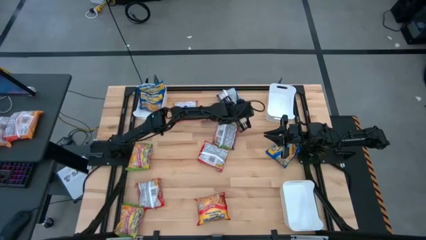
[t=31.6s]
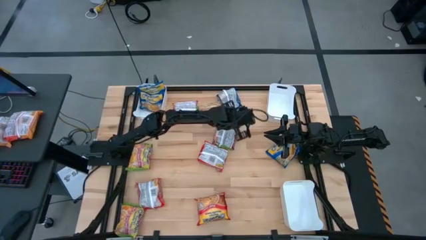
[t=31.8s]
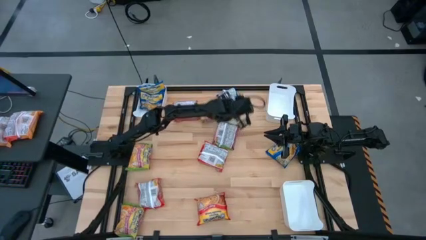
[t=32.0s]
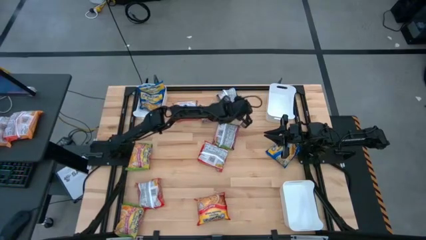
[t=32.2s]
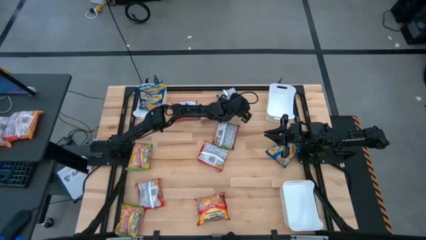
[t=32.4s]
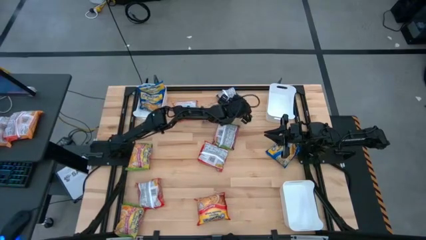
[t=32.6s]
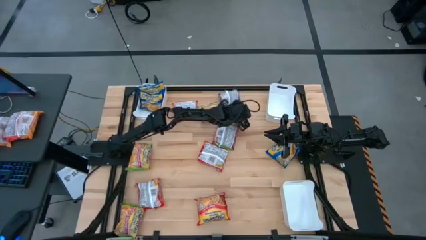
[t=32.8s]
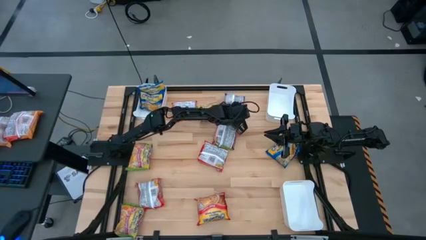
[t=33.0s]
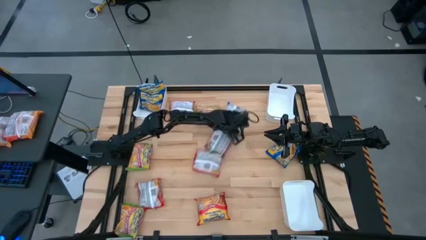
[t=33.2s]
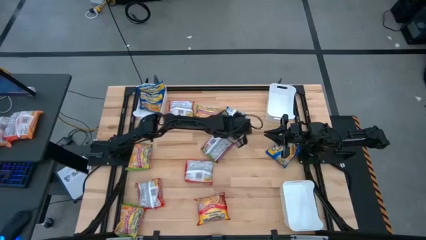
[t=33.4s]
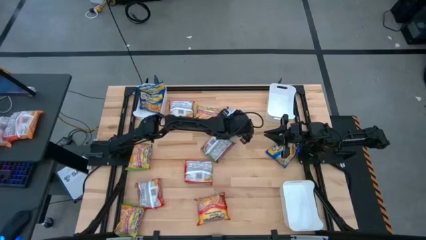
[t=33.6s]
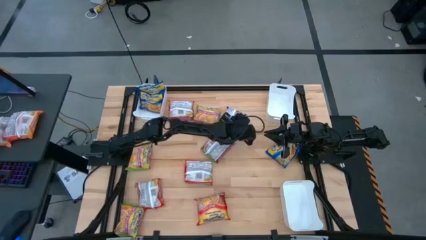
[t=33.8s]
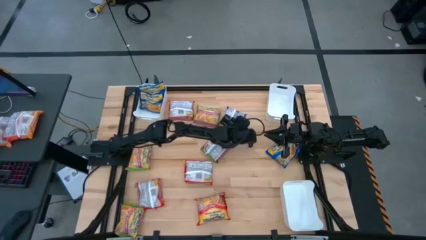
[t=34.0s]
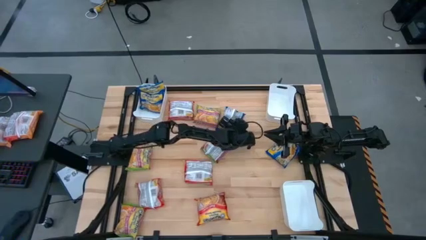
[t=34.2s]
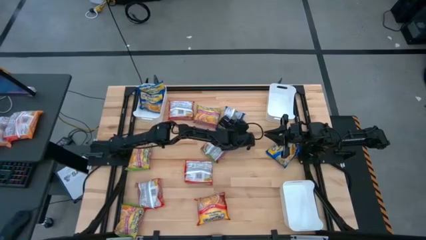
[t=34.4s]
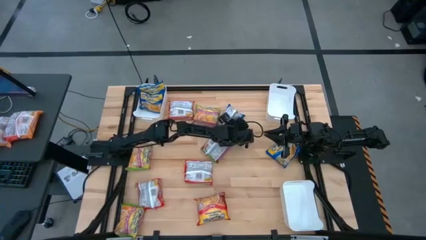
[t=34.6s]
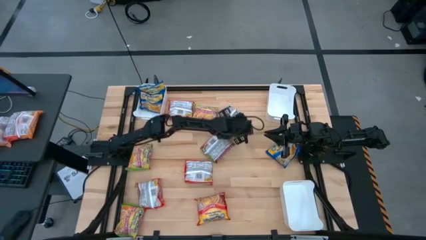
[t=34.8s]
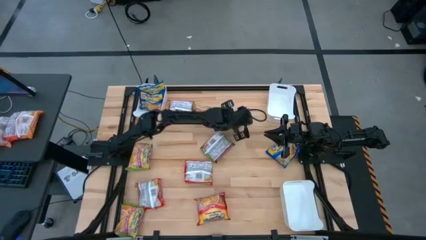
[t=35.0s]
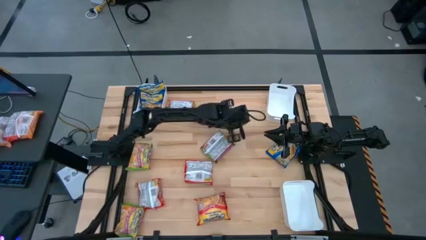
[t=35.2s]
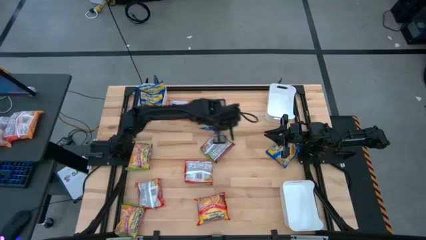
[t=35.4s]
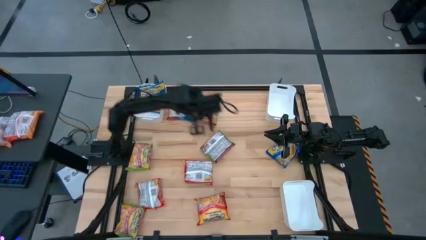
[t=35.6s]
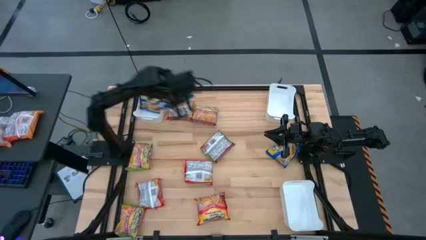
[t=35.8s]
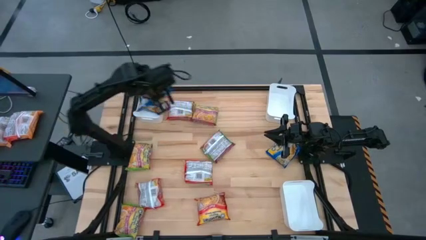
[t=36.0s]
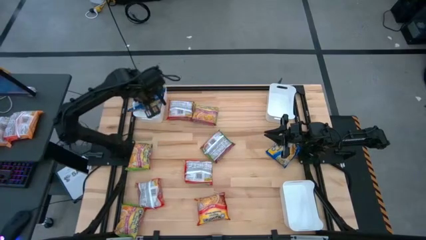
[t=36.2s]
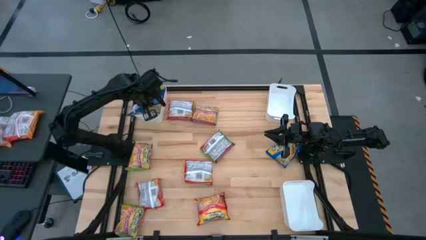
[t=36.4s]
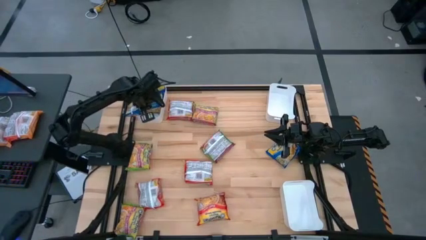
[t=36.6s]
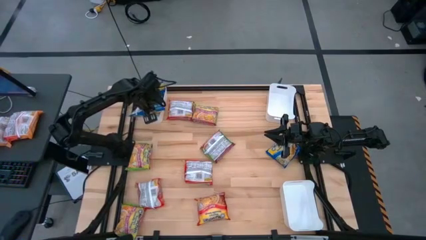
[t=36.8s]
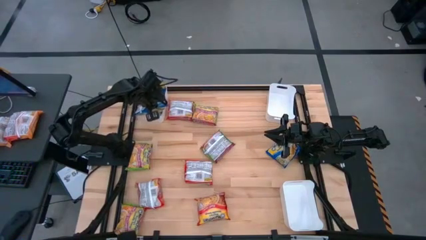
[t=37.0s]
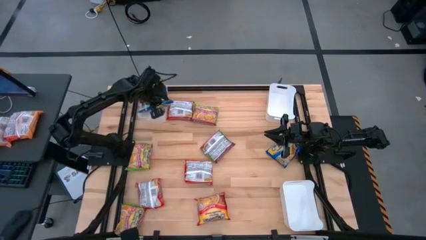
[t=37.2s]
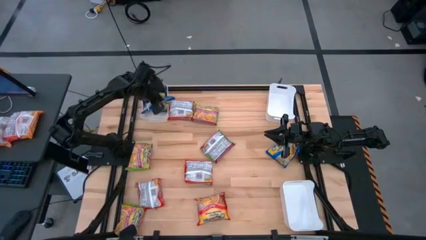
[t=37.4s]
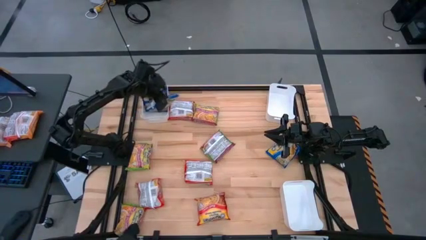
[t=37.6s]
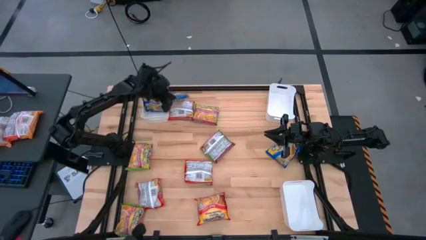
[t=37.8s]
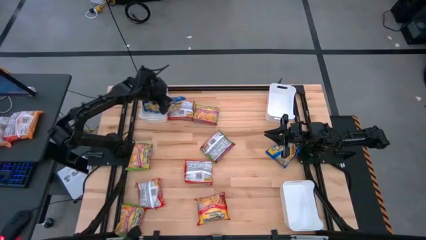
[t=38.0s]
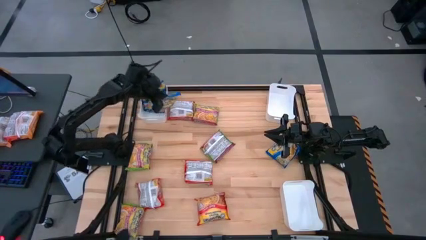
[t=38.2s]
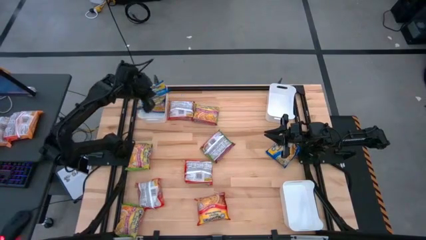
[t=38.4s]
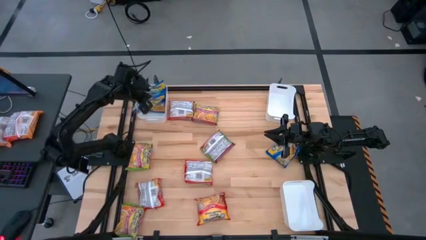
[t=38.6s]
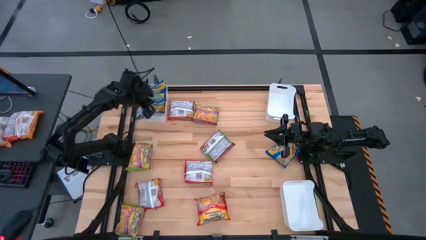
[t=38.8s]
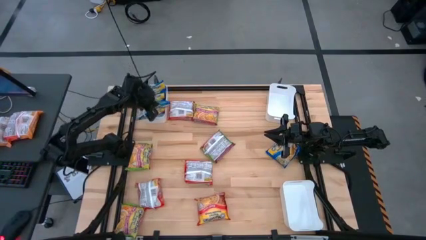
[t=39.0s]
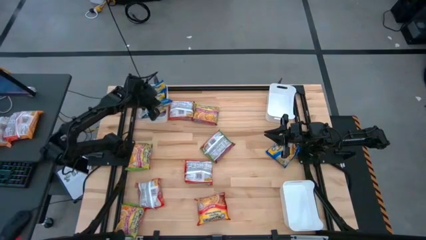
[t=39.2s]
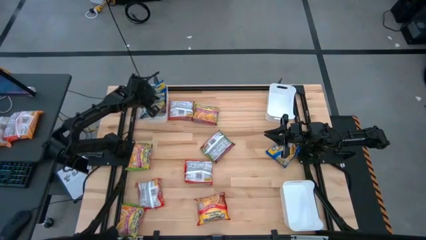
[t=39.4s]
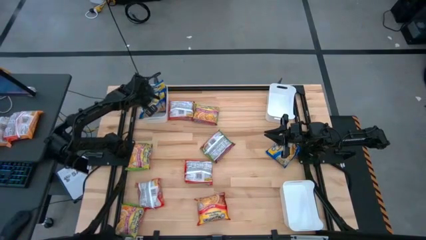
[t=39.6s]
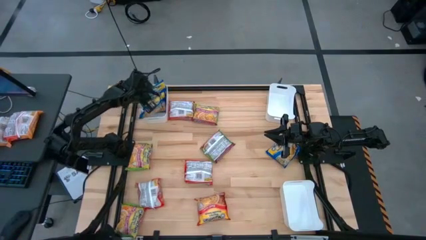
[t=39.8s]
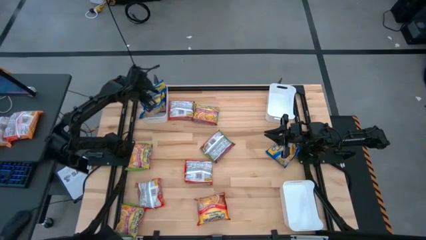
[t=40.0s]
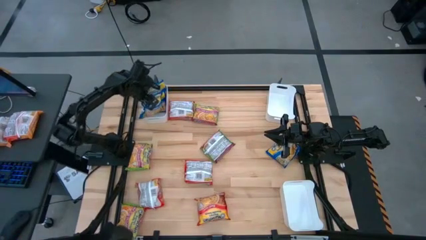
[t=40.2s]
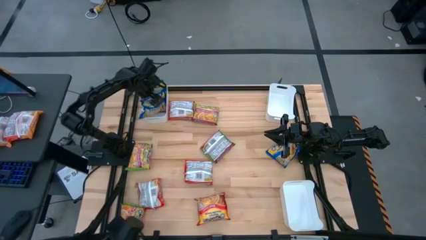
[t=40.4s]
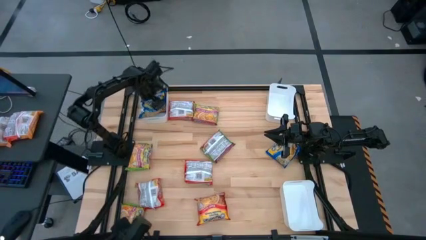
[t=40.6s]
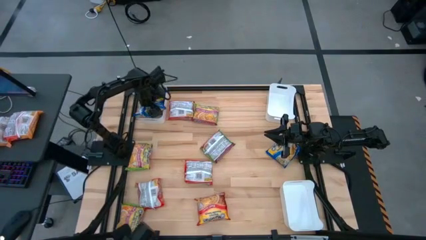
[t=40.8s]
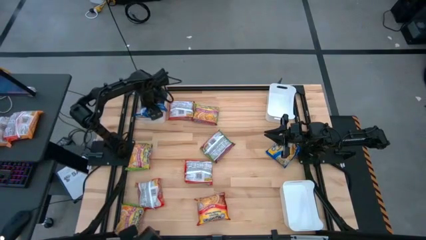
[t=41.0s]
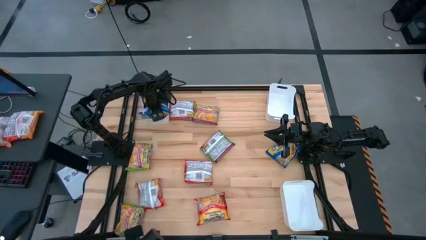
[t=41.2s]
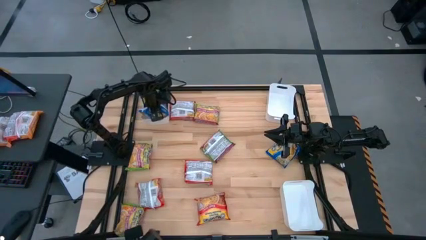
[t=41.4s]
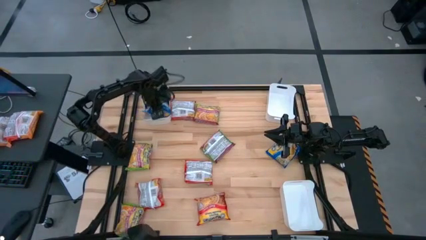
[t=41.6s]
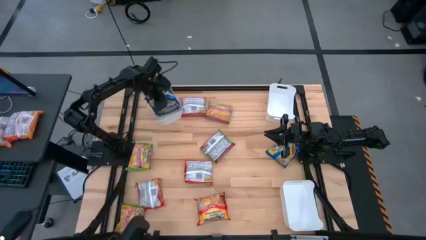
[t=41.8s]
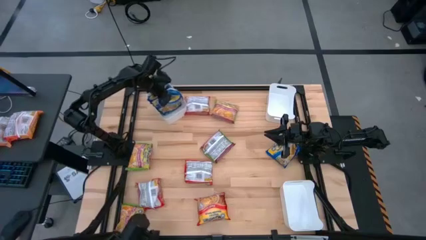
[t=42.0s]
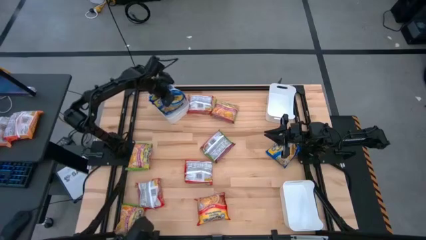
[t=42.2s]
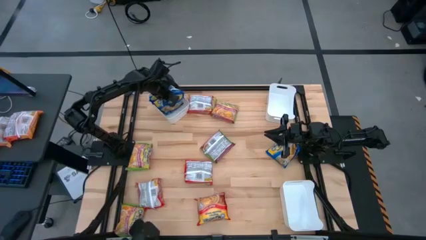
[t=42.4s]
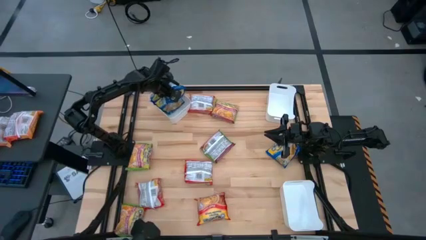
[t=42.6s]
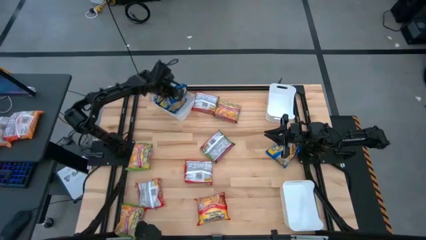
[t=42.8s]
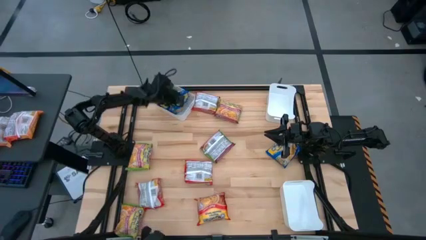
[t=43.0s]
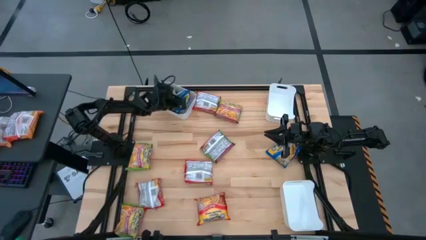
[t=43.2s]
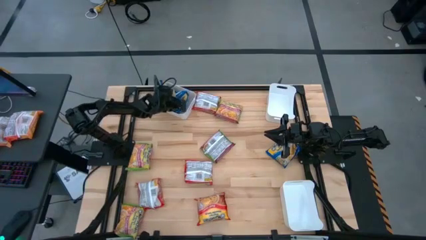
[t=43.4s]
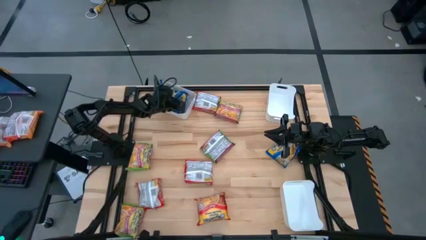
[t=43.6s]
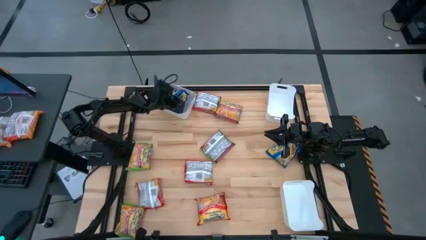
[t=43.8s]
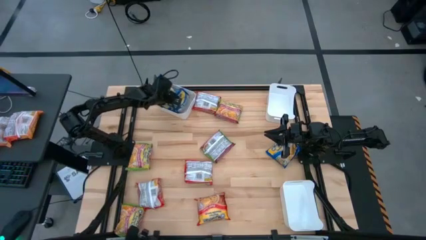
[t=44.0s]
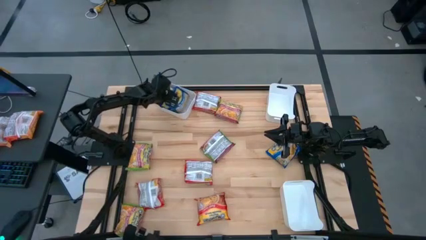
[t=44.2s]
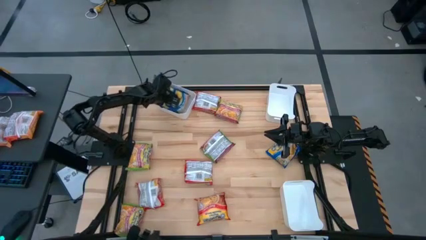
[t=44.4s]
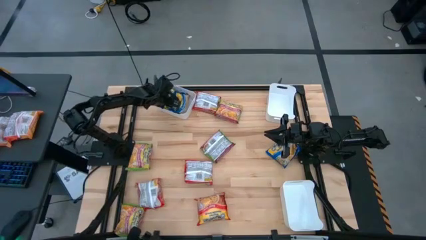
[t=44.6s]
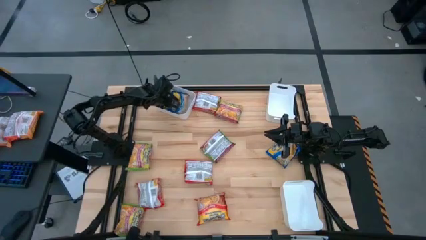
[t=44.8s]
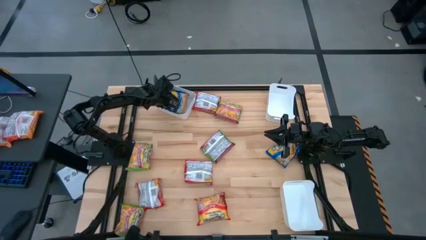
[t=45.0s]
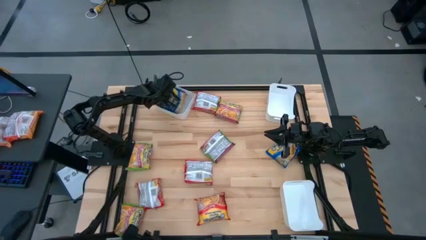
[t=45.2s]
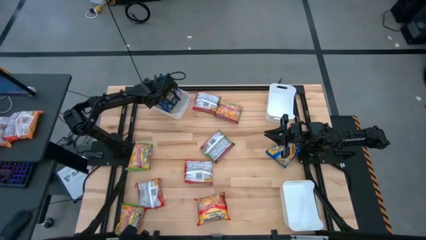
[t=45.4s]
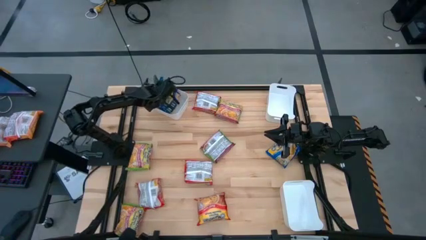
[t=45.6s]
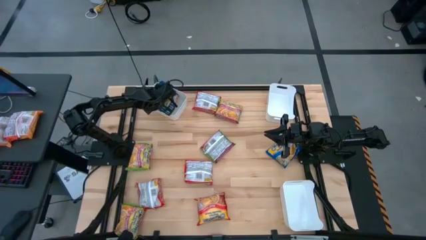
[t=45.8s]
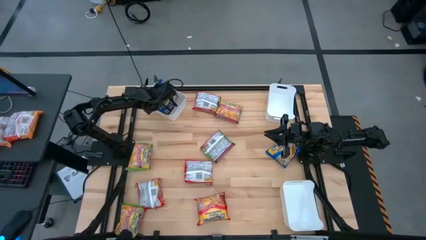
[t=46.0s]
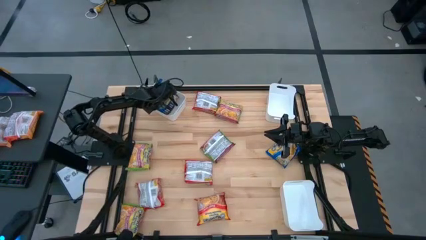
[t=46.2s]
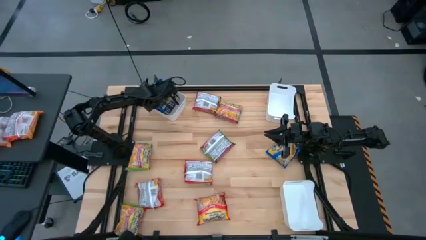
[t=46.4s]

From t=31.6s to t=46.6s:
Task: Sort Maruchan noodles
Put the blue noodle pack into the top left white bin
